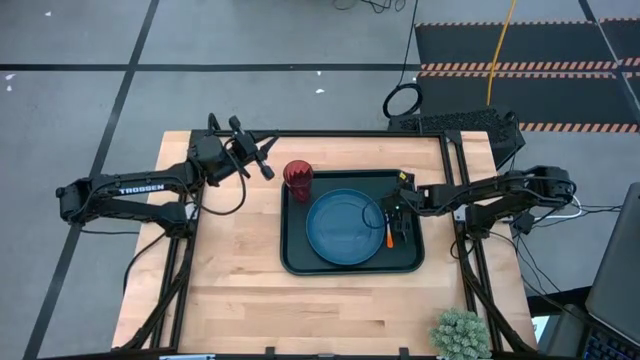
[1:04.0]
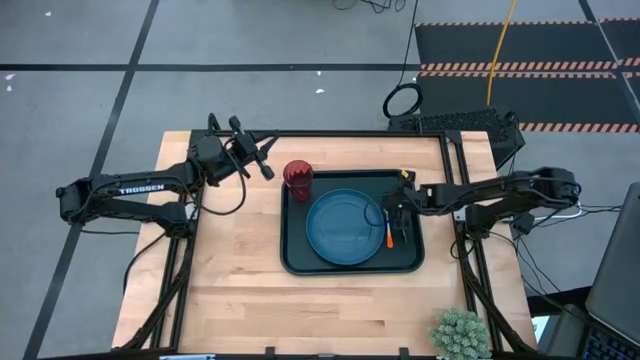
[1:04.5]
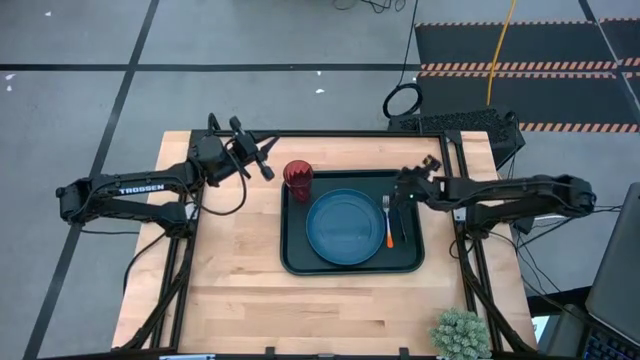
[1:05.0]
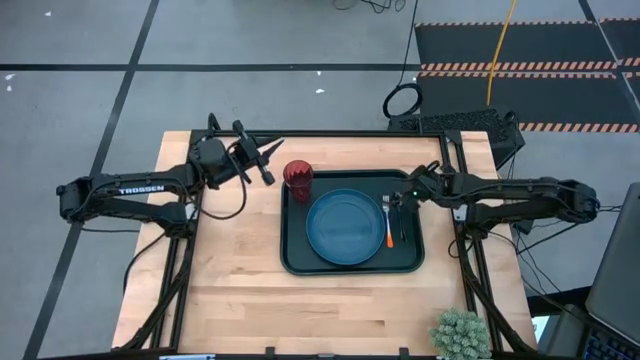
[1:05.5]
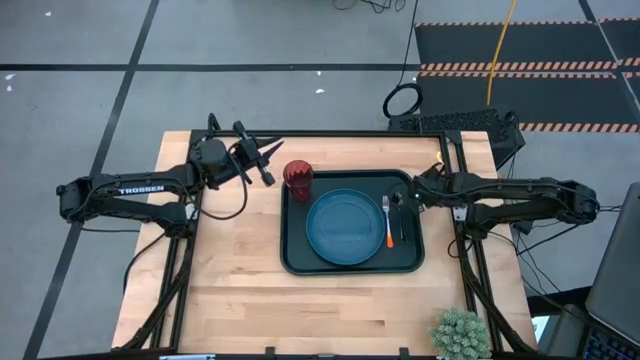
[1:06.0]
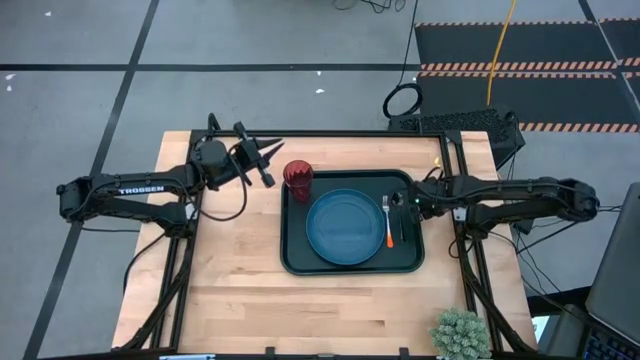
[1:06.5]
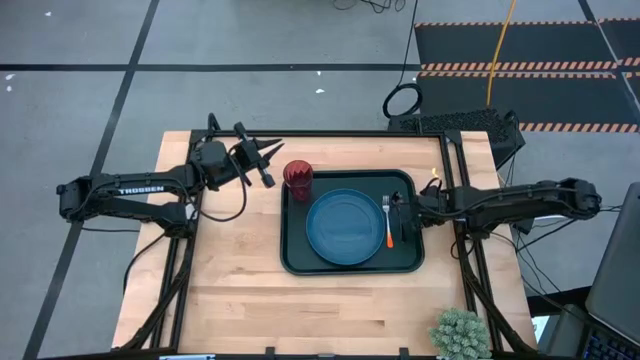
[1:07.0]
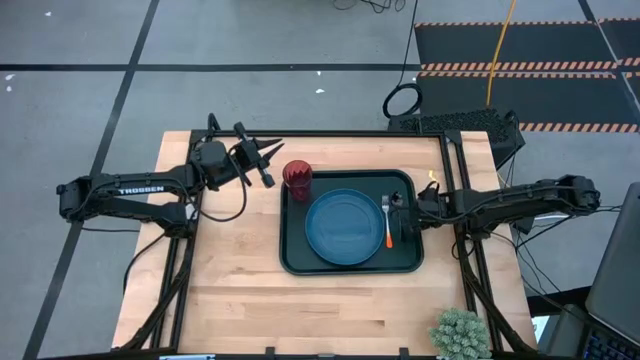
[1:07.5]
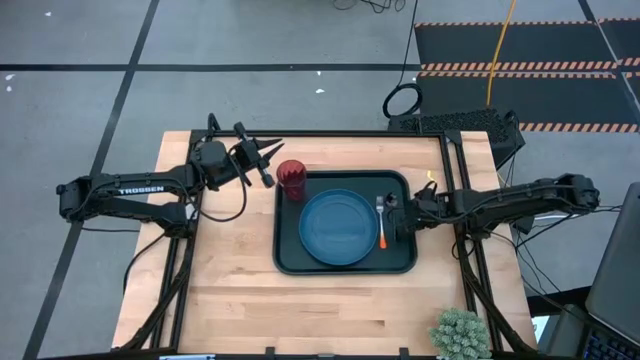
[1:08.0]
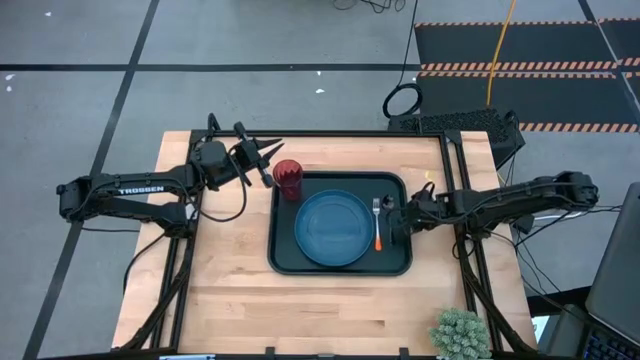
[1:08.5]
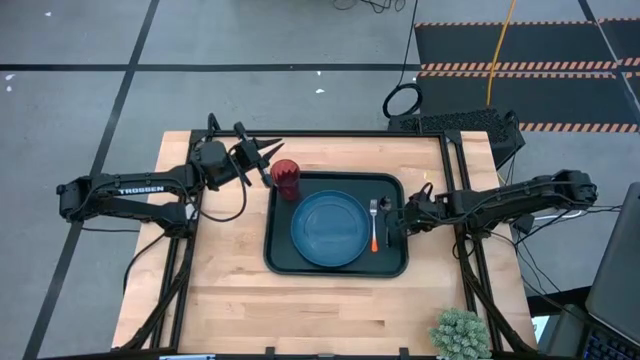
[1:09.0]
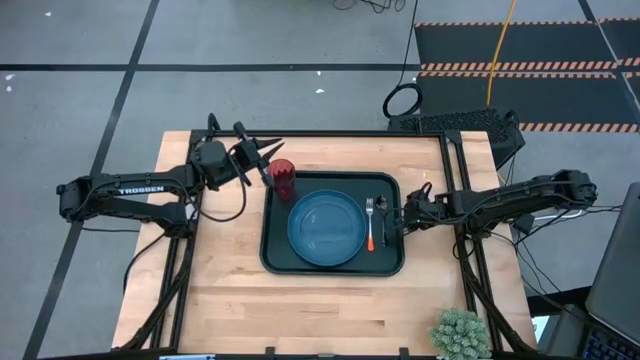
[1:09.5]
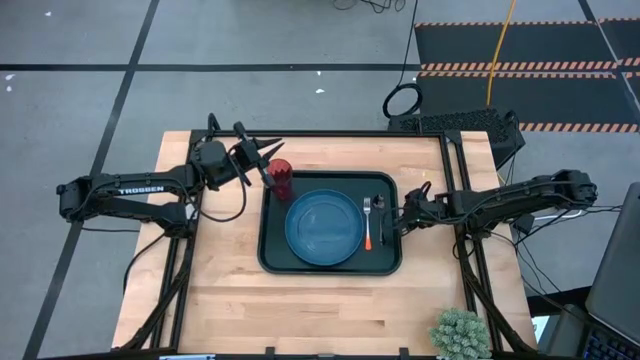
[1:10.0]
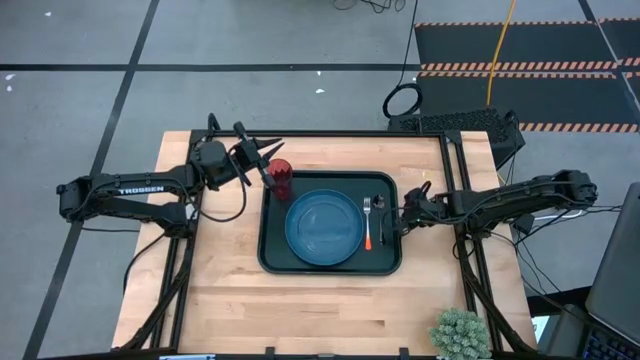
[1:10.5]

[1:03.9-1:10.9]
Task: Pick and place plate/cup/fork/spoon on tray
Adjust the black tray

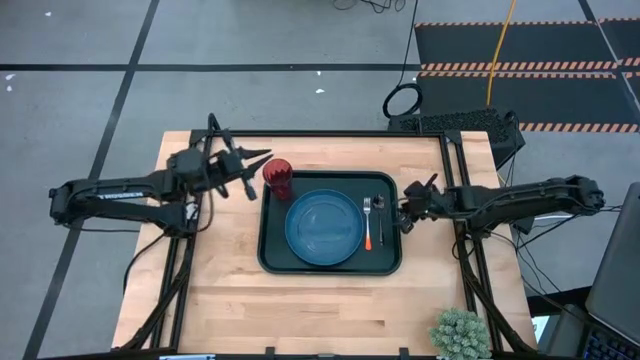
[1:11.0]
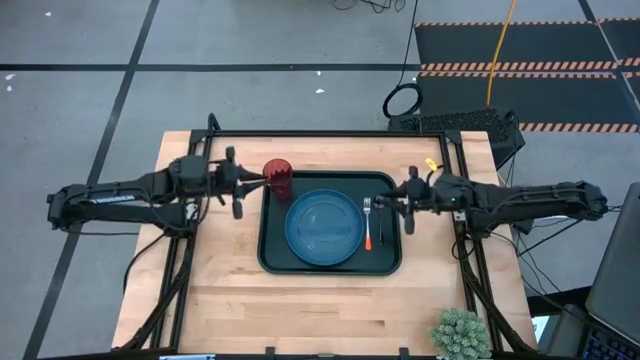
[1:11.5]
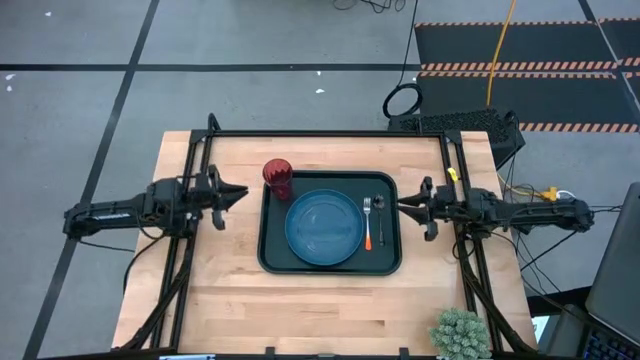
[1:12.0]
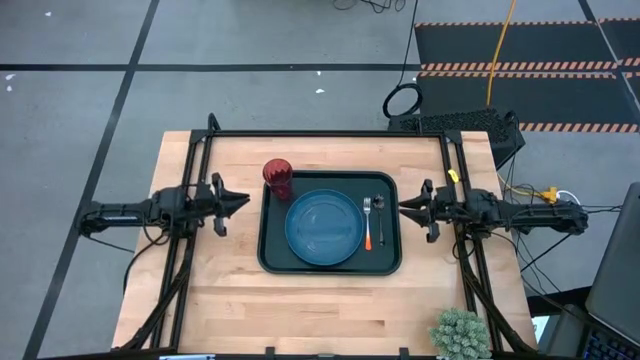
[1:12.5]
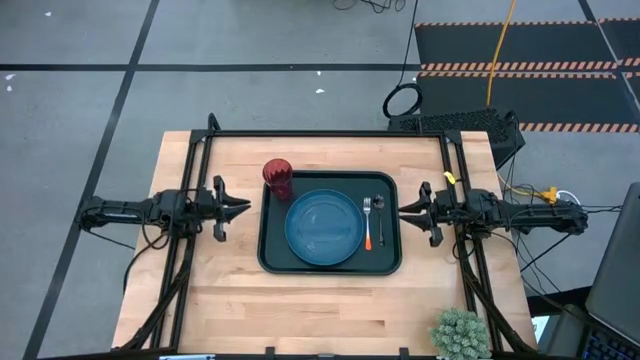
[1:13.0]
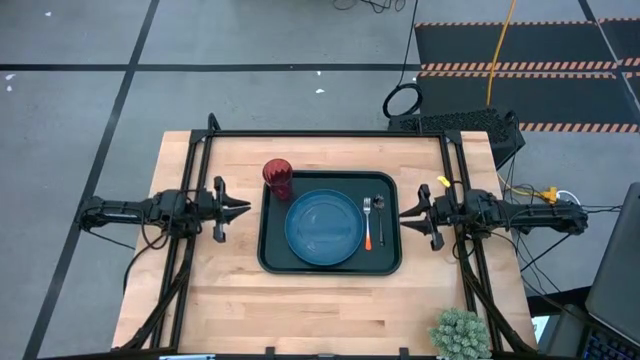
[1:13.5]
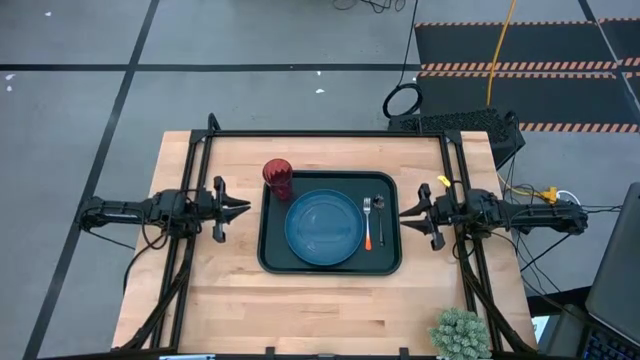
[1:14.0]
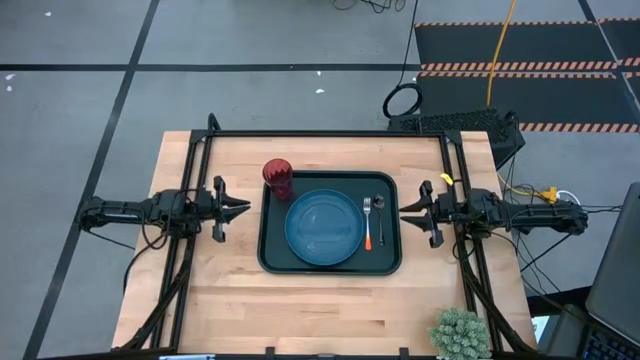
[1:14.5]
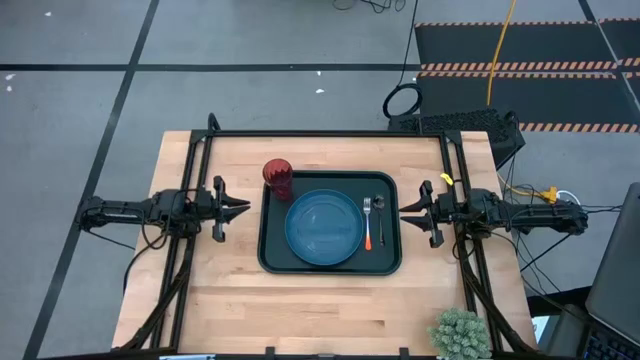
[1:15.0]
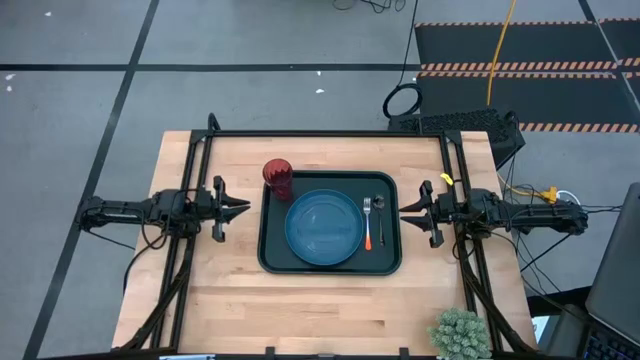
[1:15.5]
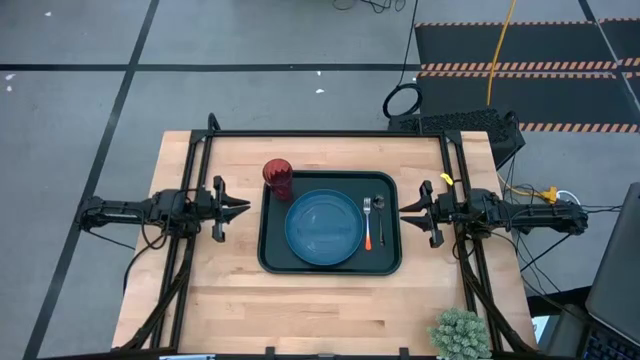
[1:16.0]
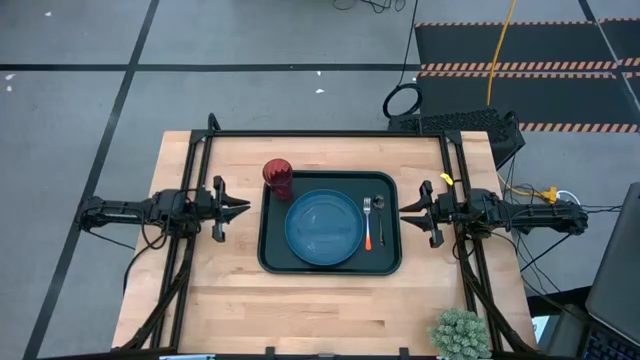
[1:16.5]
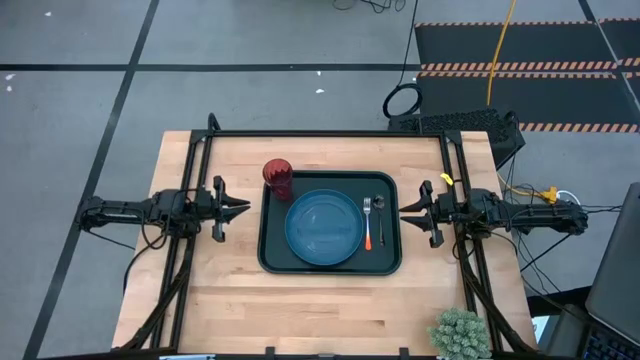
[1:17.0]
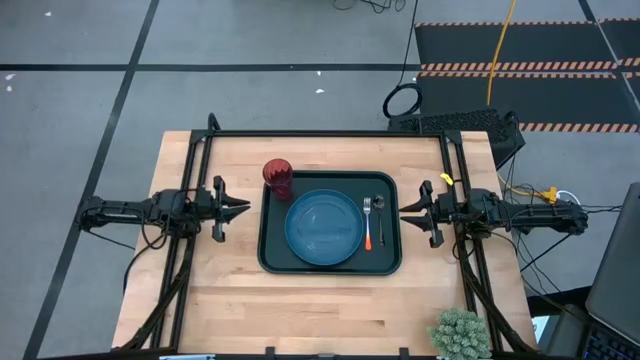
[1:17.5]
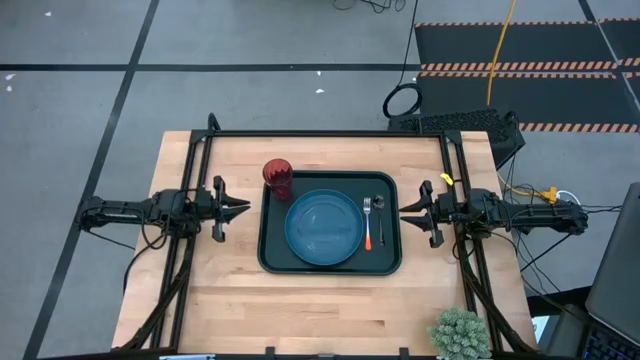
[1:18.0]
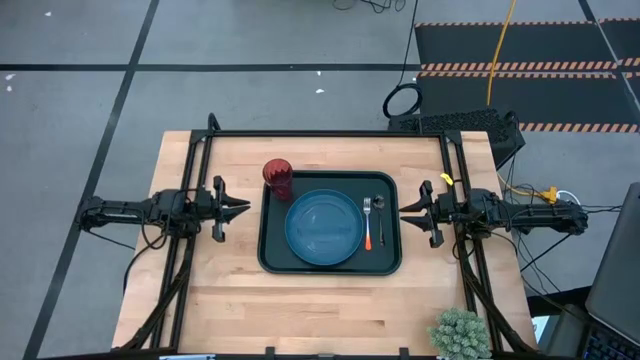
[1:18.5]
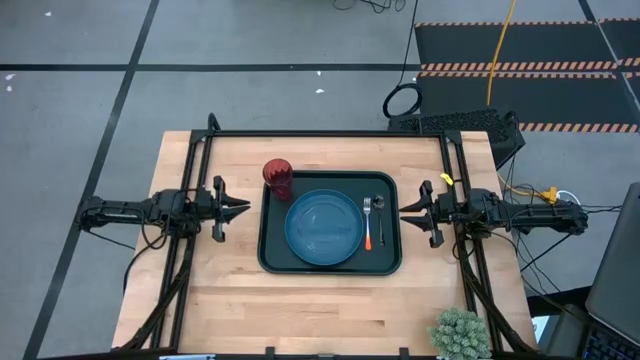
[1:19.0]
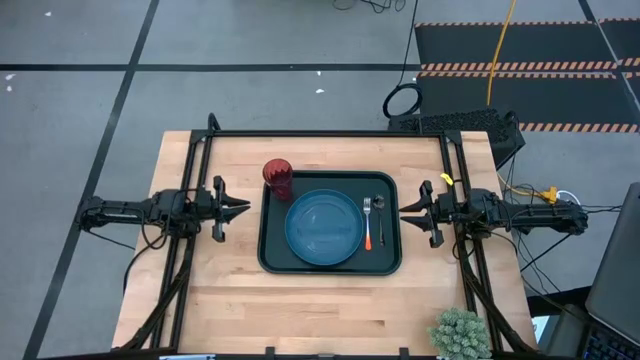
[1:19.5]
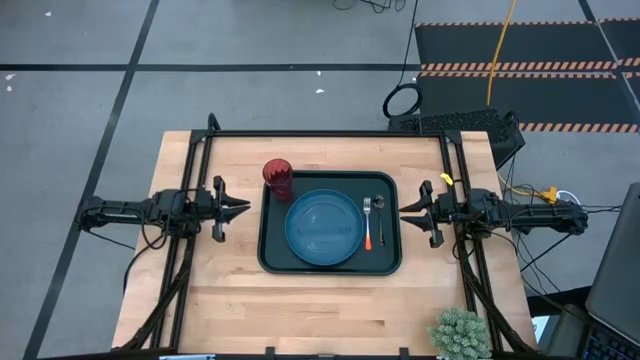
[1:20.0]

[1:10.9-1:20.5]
Return to Home Position

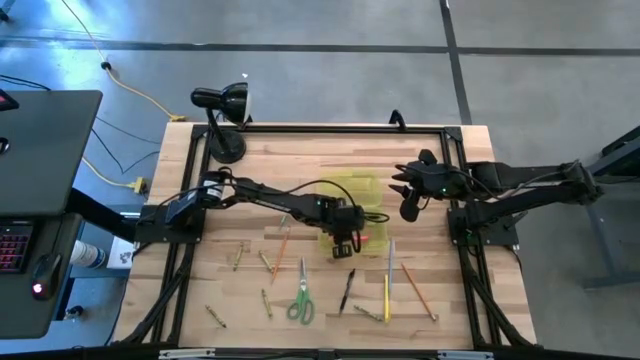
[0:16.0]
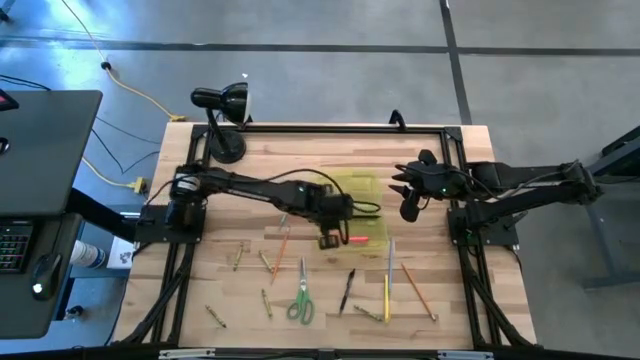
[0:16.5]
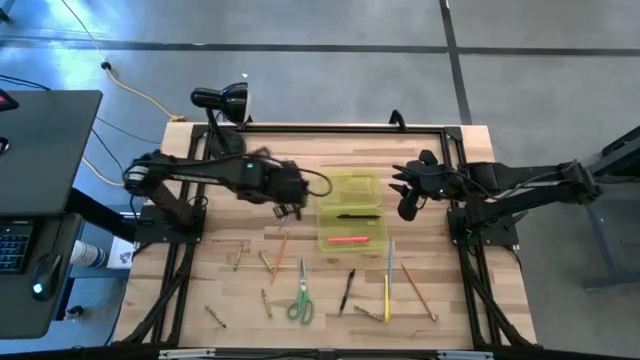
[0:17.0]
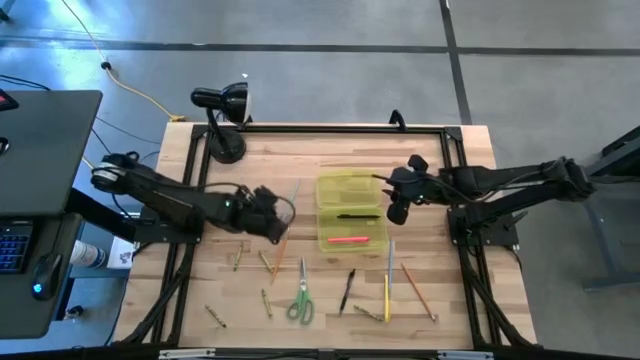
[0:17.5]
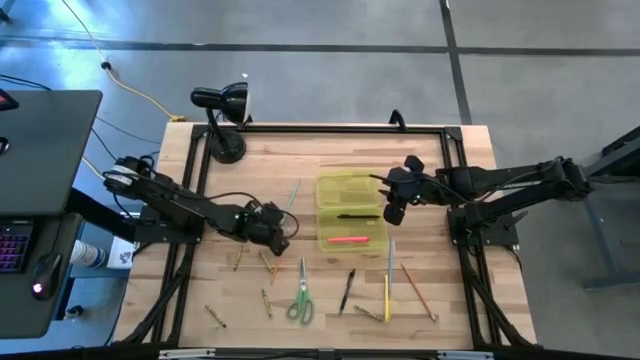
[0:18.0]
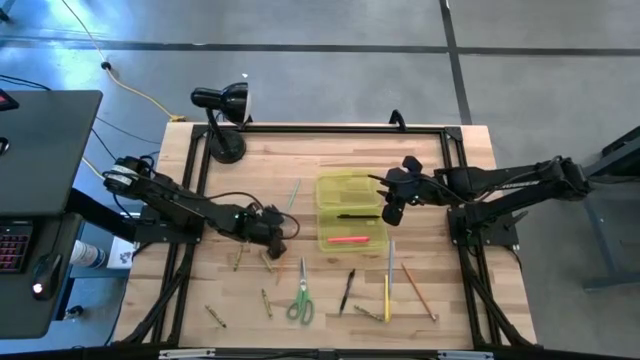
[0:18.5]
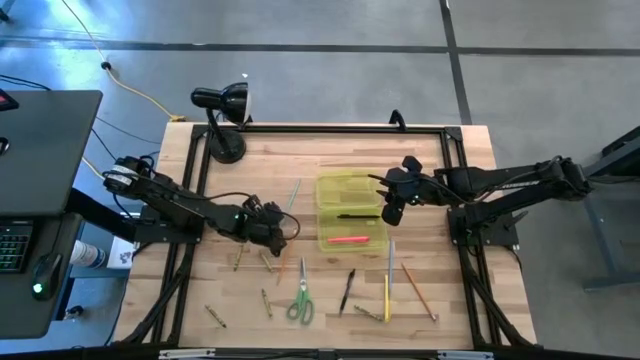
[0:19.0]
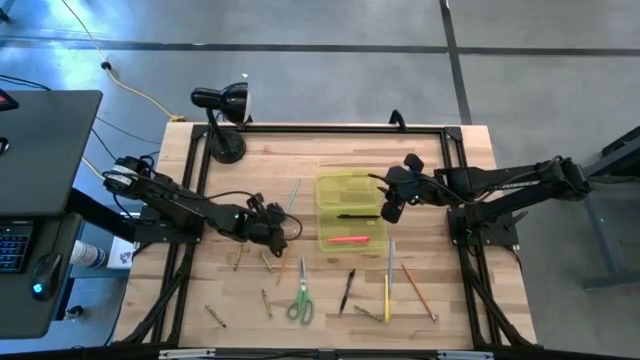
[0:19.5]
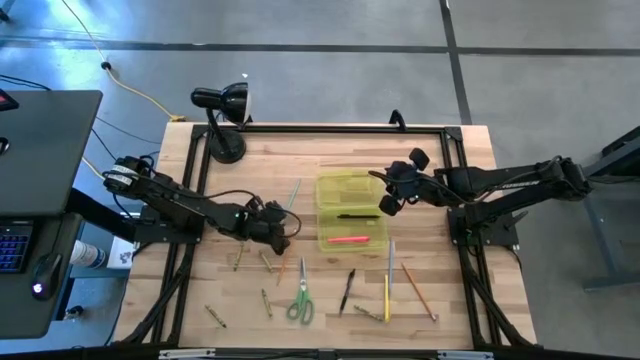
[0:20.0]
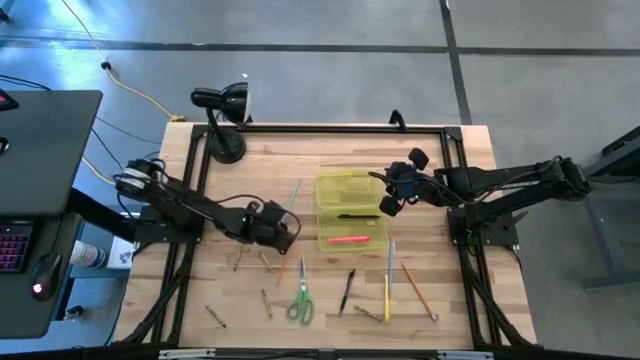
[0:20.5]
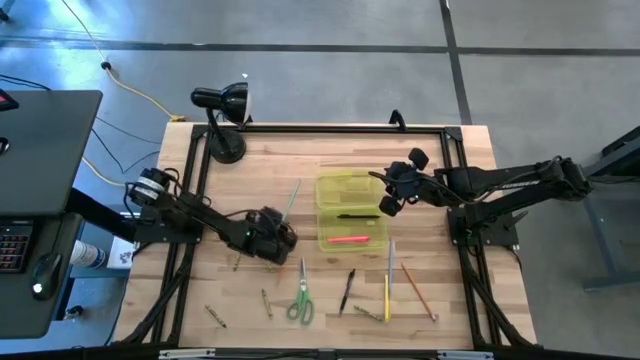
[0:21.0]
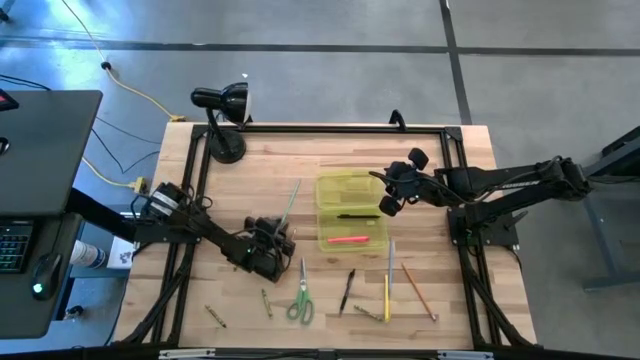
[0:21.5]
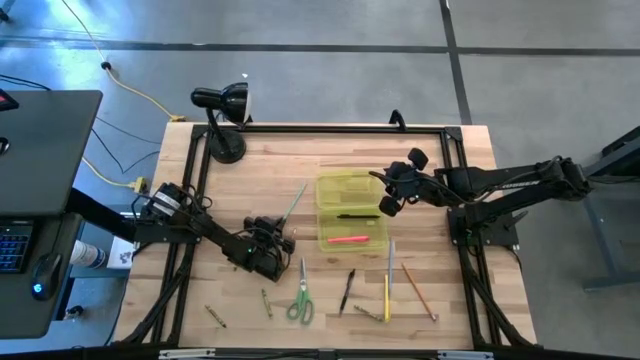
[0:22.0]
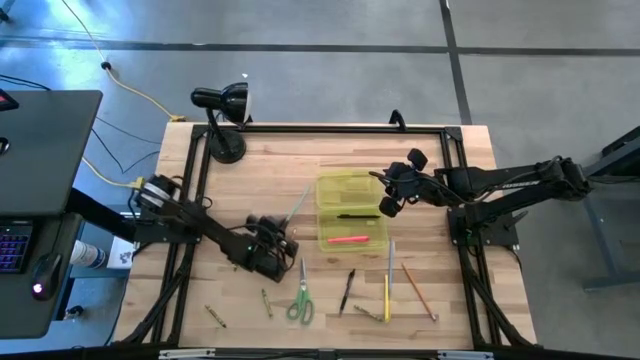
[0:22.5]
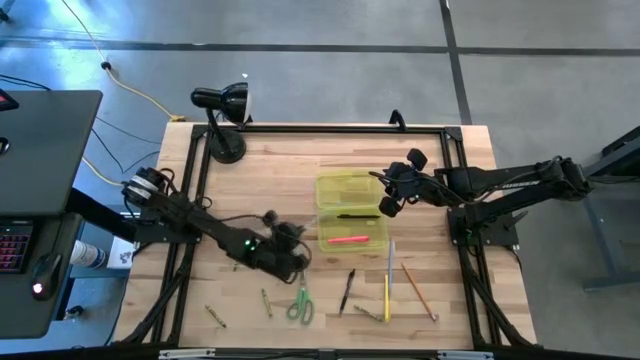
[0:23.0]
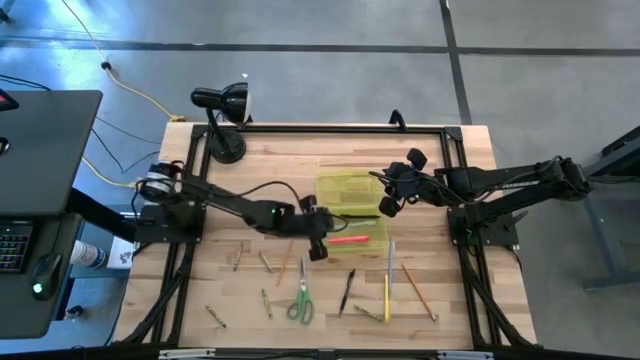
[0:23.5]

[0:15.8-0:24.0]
Task: Pick & place school supplies into a supply box
Put the blue pencil into the yellow supply box
